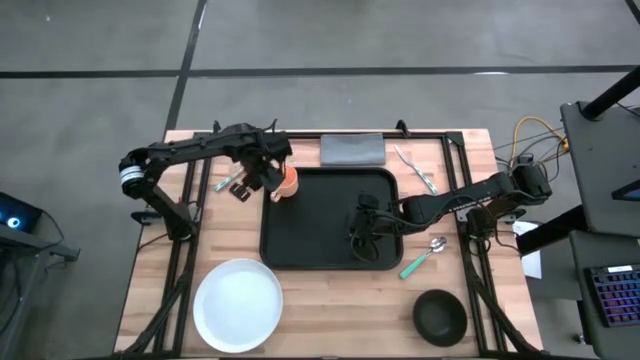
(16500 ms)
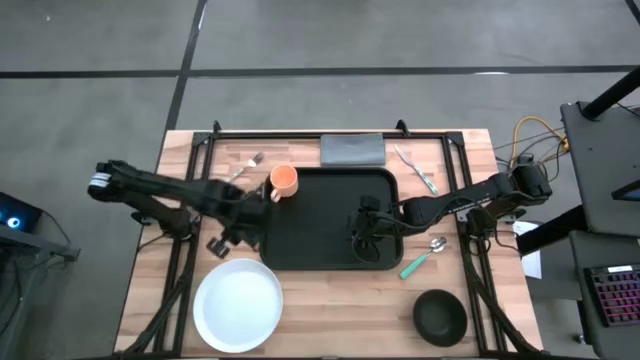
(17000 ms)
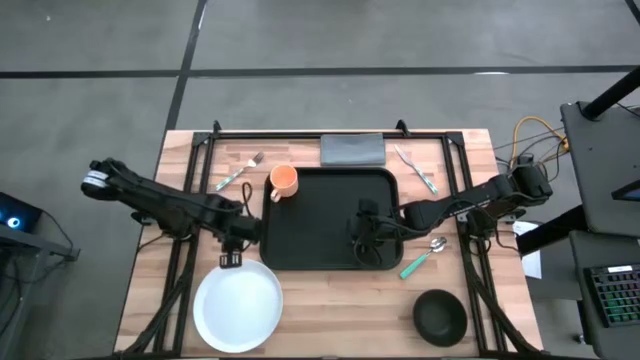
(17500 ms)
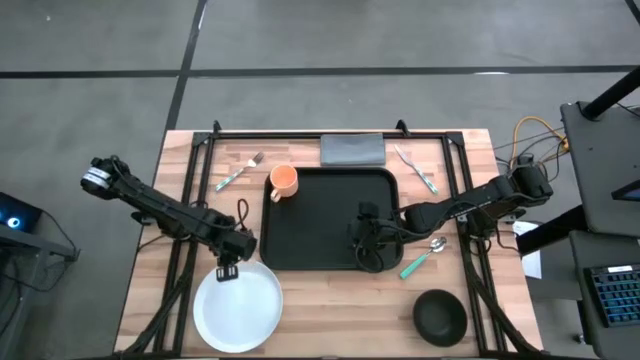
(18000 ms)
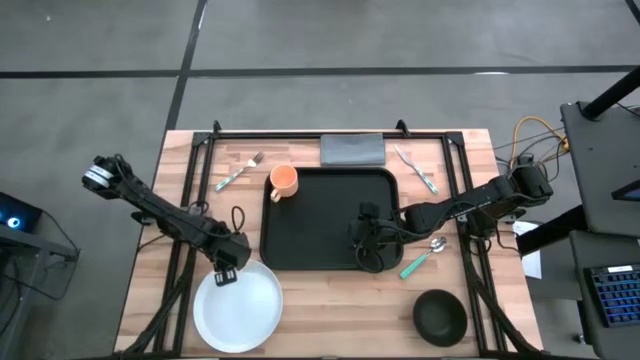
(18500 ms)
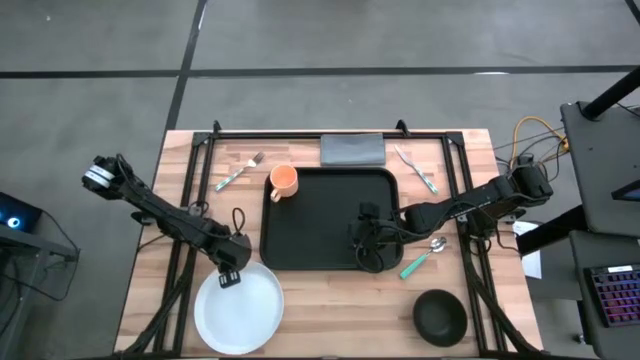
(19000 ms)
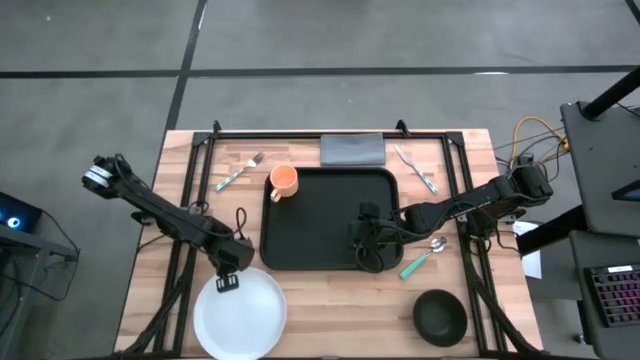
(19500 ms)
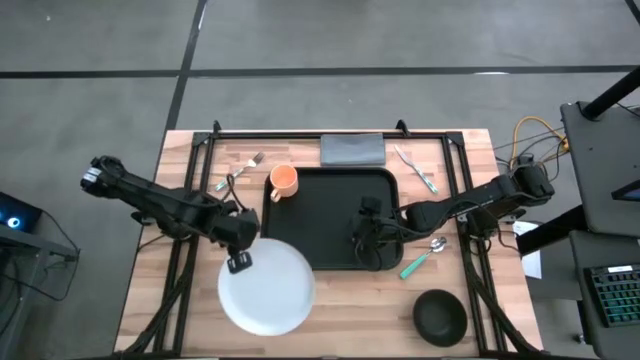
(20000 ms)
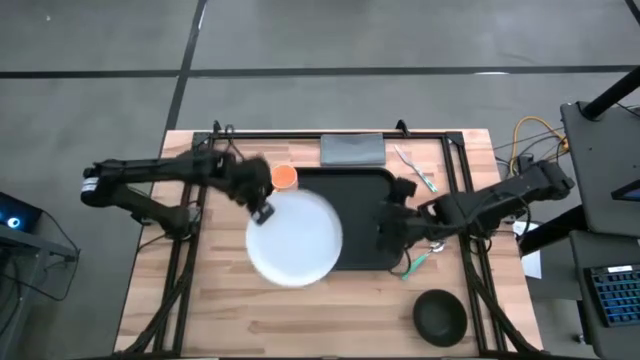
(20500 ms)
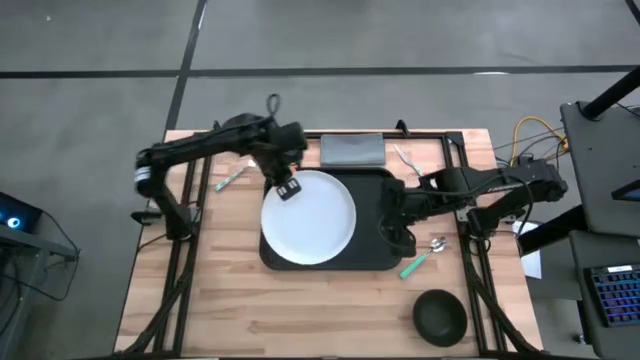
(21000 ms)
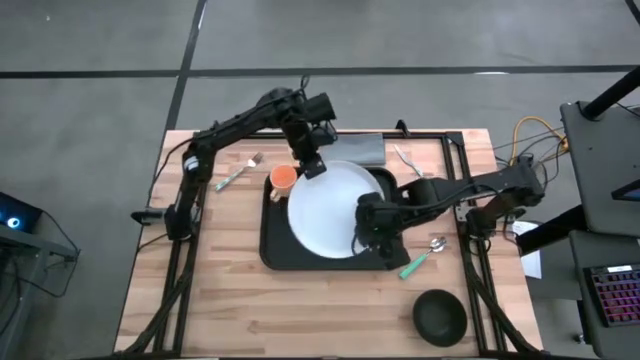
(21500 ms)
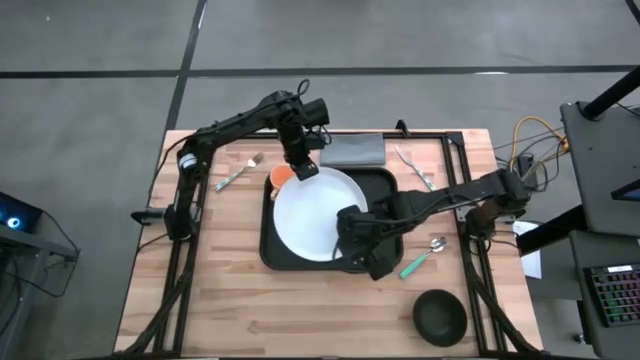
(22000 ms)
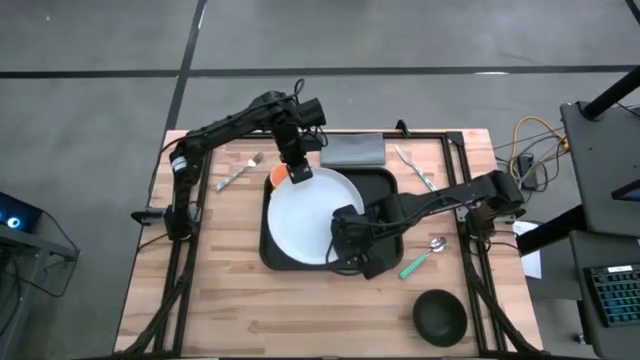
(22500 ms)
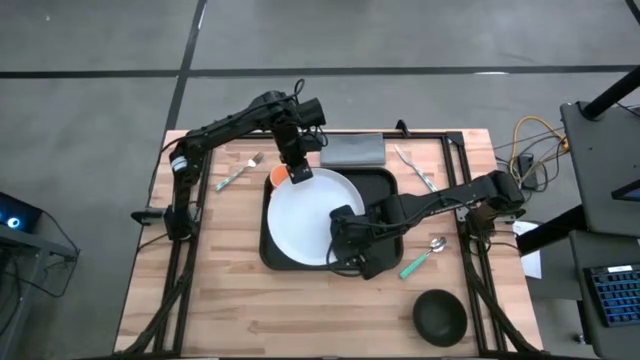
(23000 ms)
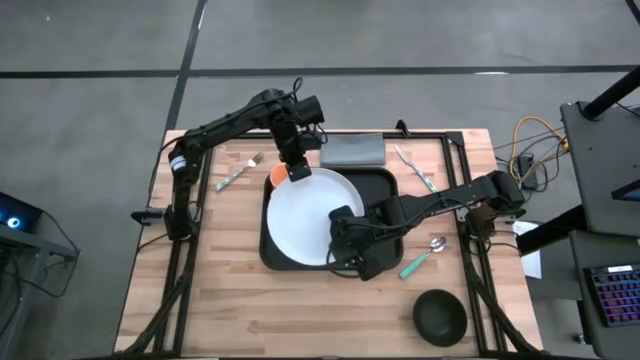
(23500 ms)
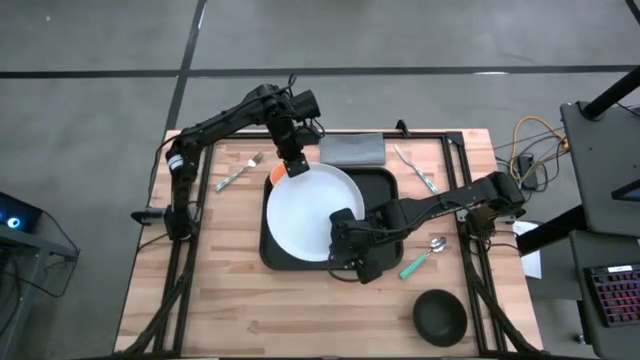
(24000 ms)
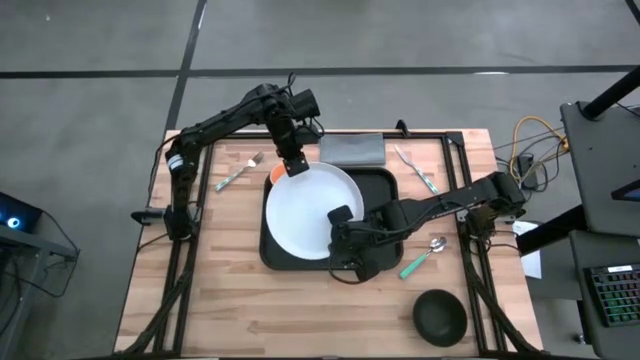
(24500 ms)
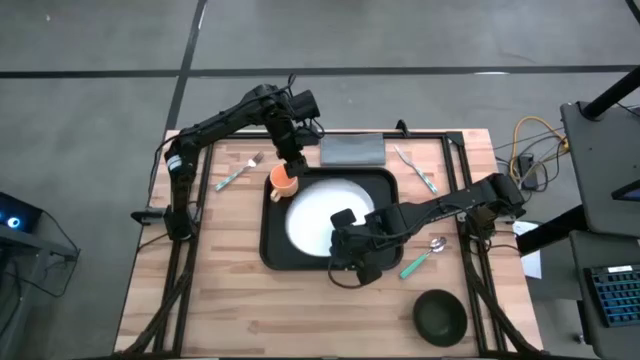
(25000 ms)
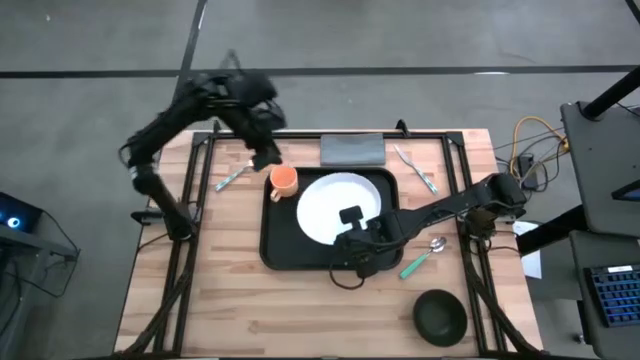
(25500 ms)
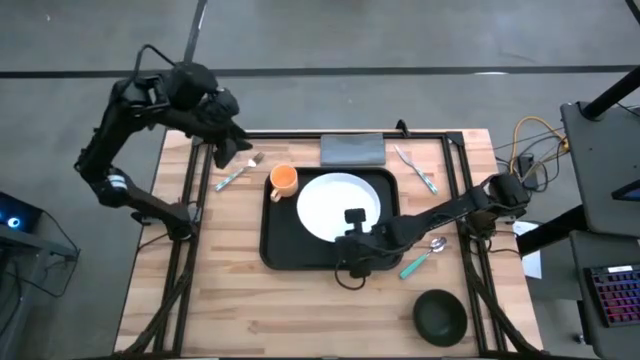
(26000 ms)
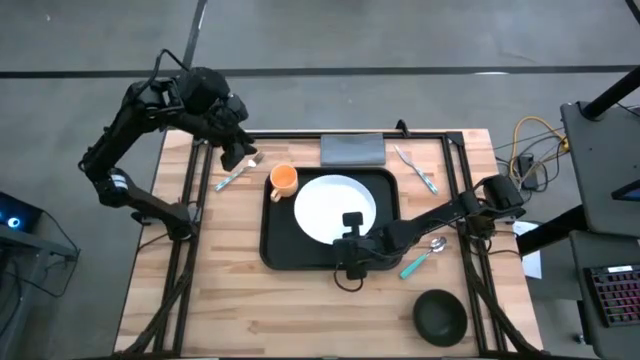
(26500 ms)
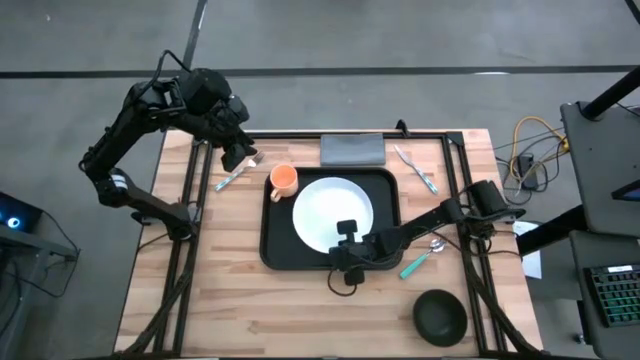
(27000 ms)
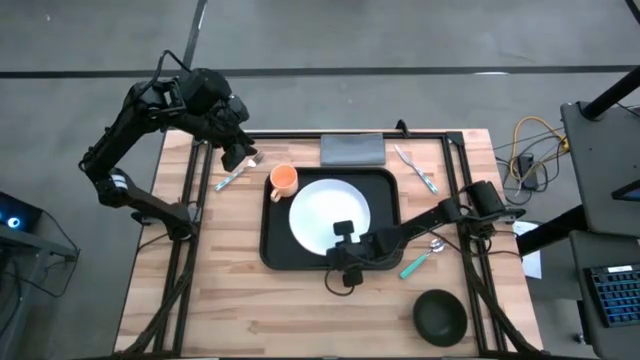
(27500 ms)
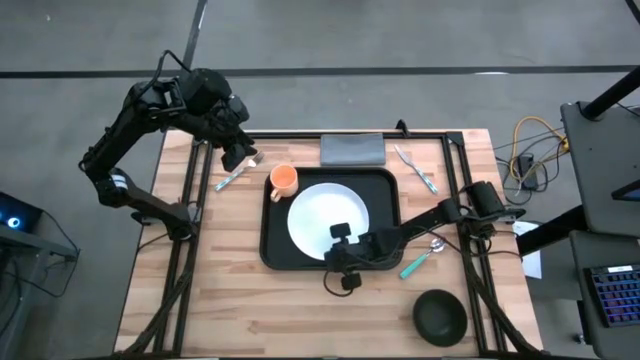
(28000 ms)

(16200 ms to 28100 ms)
Task: Set up tray
Put the white plate to the right of the orange mug on the black serving tray

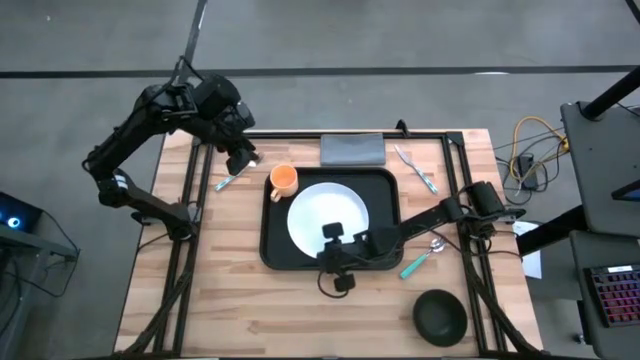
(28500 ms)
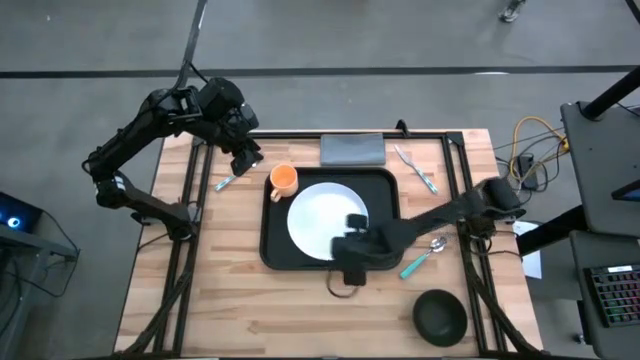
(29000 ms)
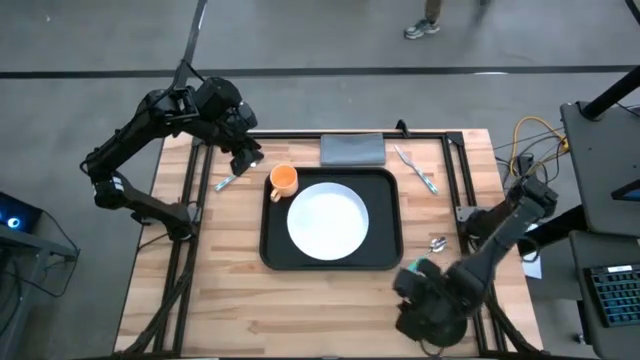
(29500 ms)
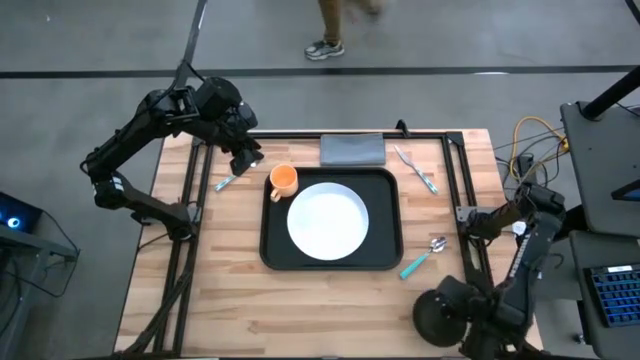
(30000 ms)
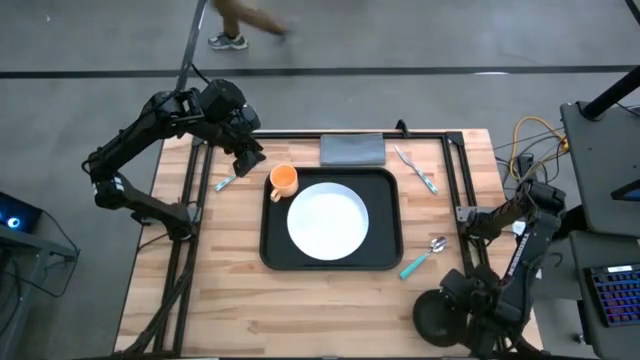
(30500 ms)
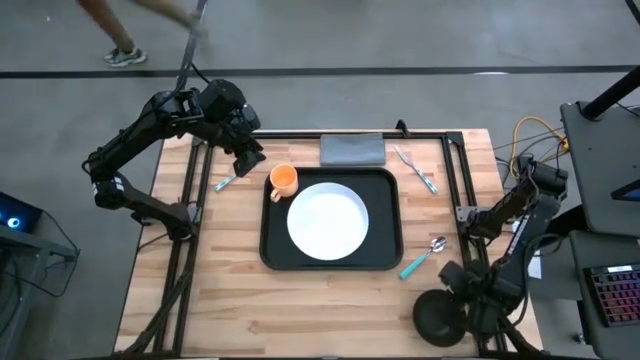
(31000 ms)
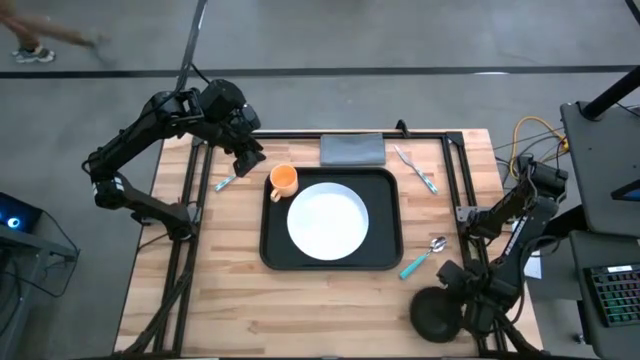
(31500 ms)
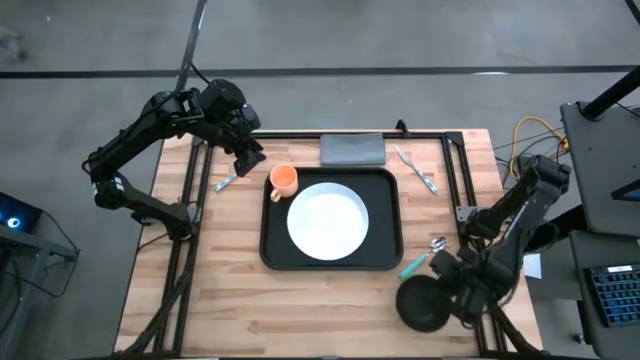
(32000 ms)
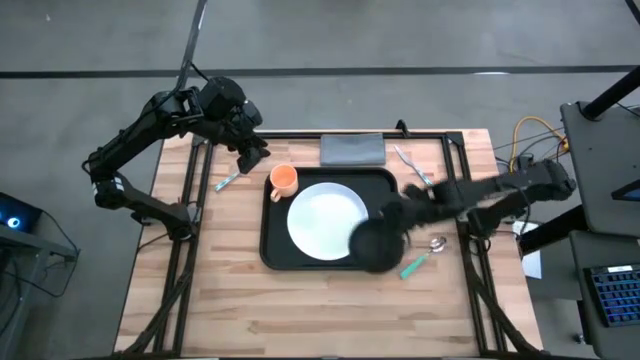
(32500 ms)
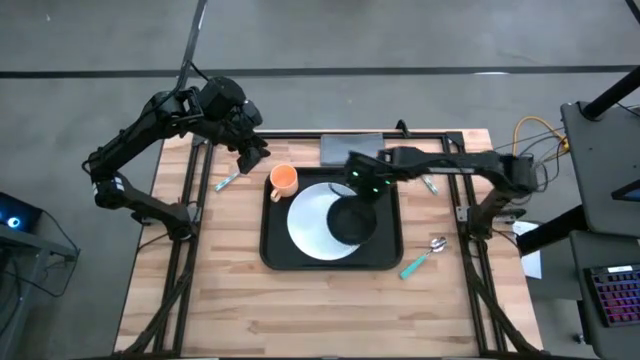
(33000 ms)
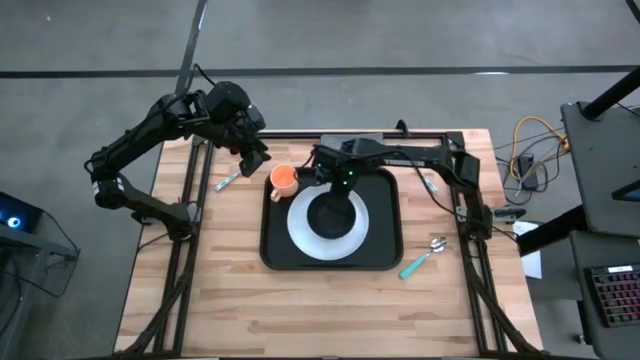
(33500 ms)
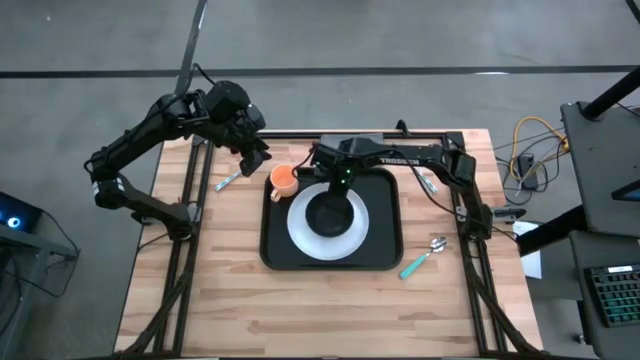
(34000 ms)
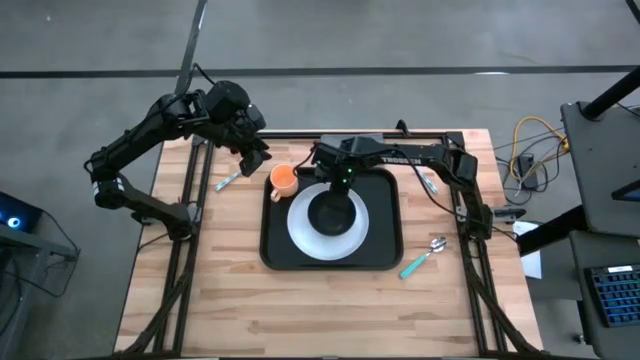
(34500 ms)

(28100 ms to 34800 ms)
Put the black bowl on top of the white plate on the black serving tray

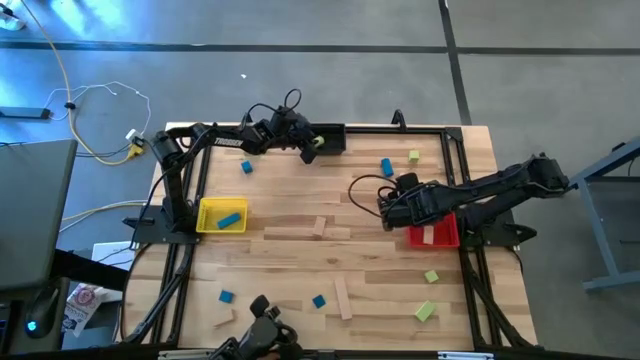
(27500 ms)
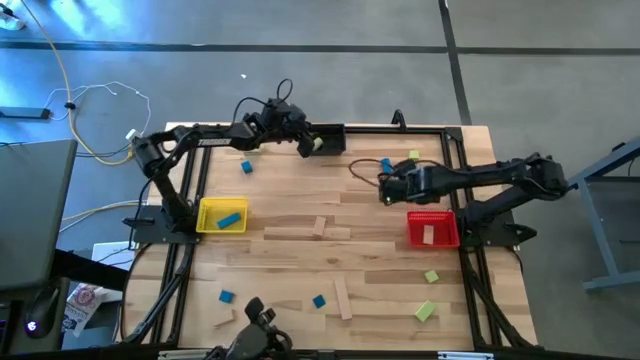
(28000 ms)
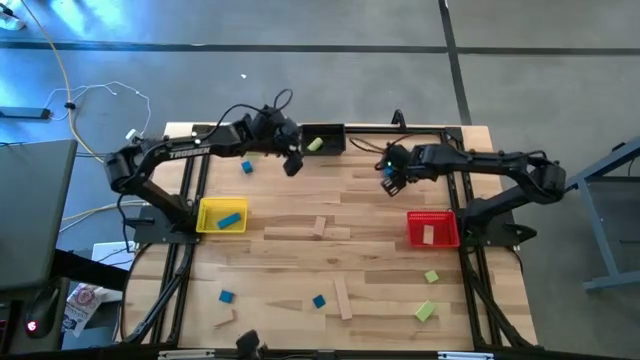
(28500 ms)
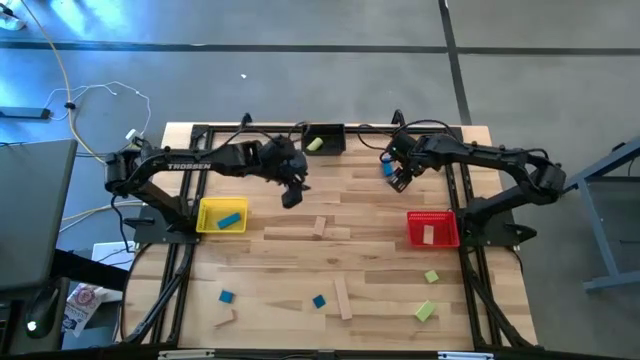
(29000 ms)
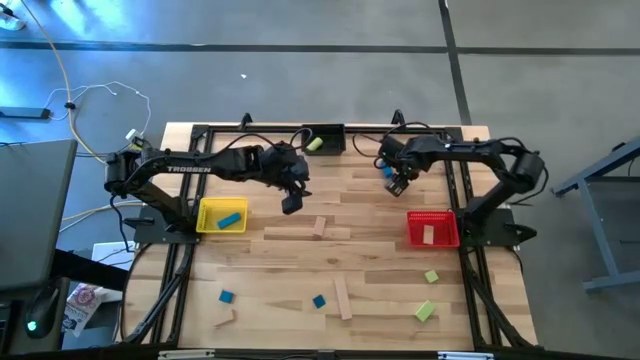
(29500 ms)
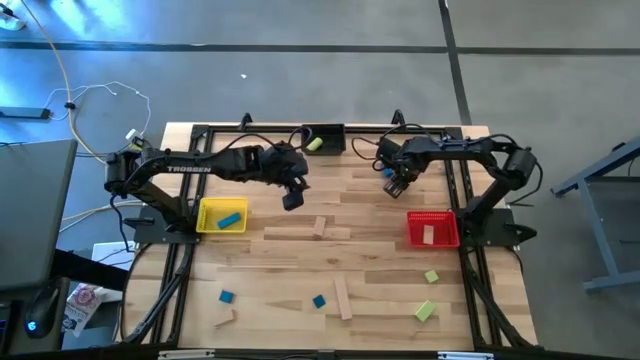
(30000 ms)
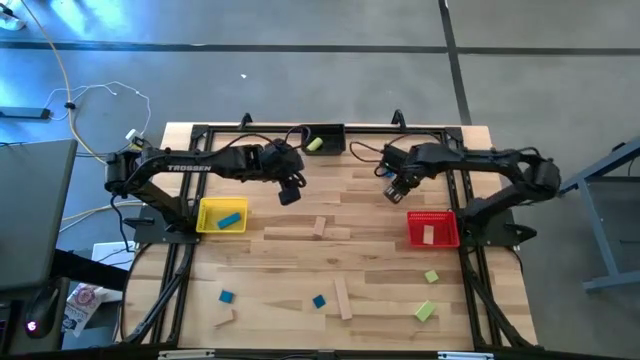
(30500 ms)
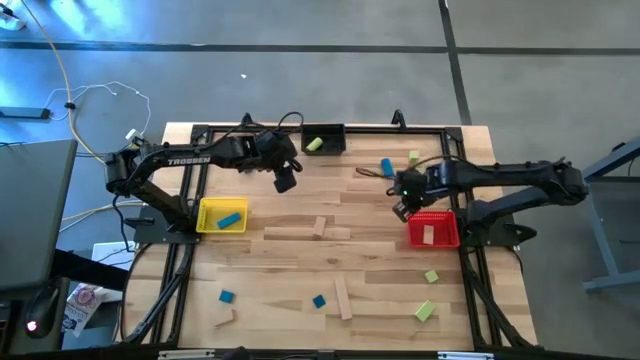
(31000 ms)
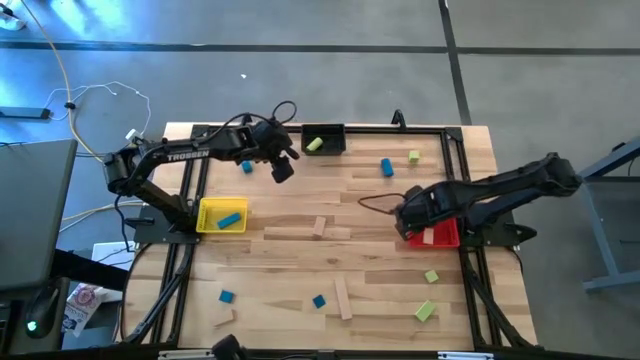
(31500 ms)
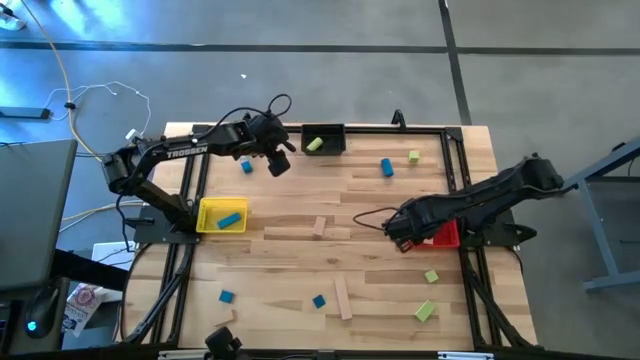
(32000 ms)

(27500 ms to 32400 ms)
Task: Sort & place blocks by color
Put the light brown block into the red bin
